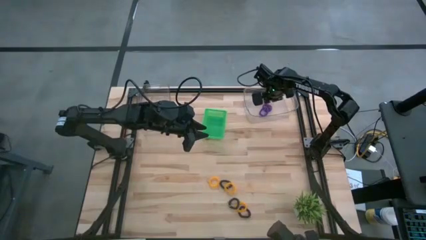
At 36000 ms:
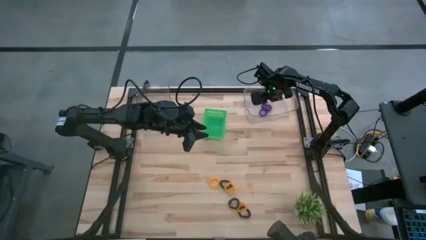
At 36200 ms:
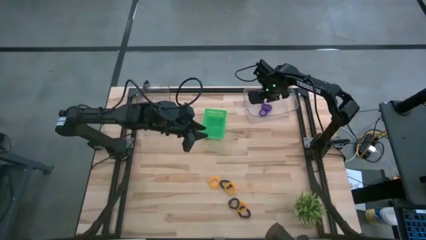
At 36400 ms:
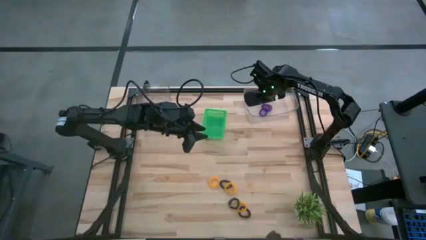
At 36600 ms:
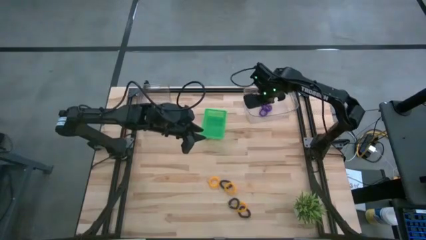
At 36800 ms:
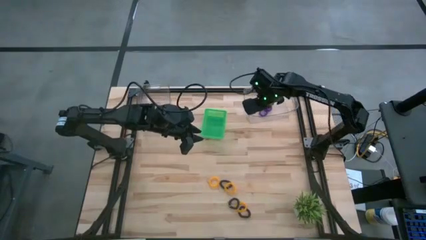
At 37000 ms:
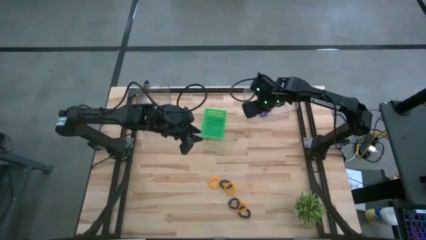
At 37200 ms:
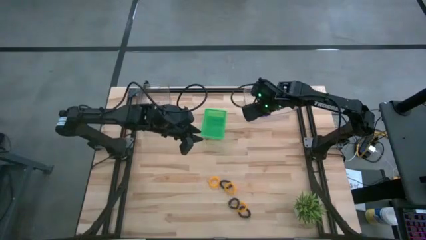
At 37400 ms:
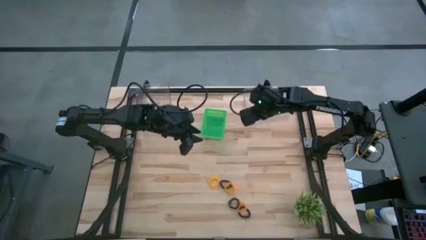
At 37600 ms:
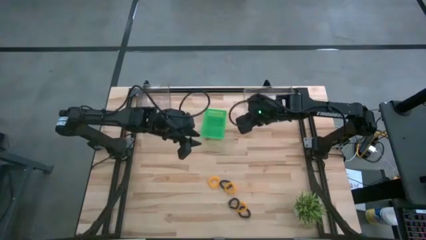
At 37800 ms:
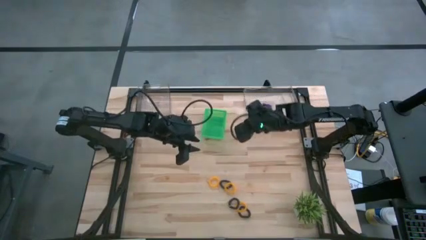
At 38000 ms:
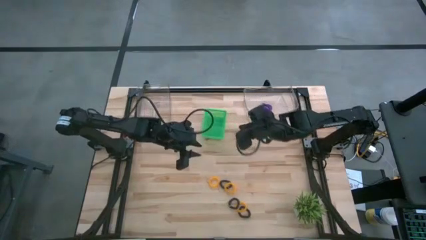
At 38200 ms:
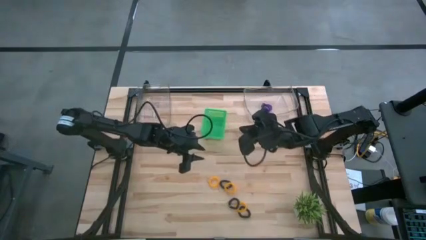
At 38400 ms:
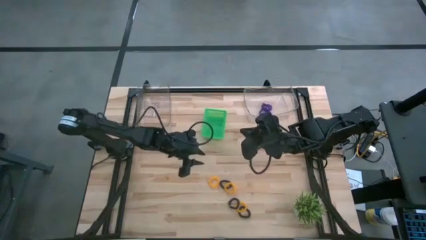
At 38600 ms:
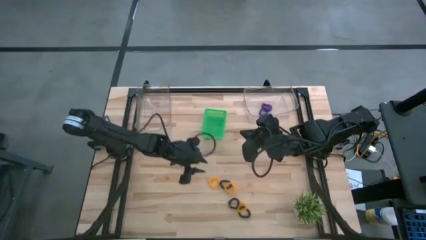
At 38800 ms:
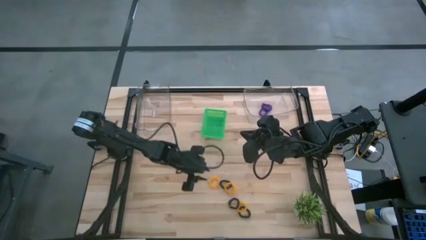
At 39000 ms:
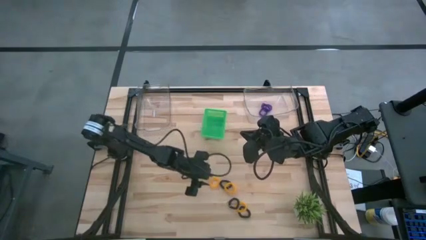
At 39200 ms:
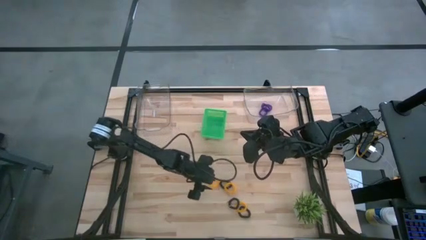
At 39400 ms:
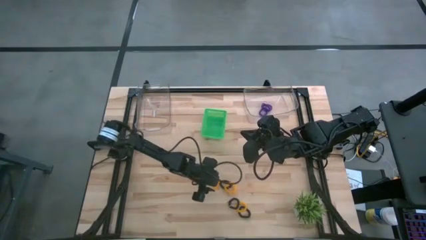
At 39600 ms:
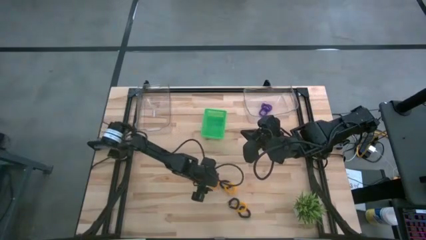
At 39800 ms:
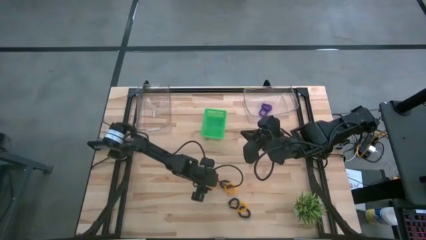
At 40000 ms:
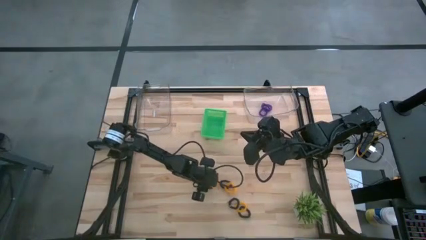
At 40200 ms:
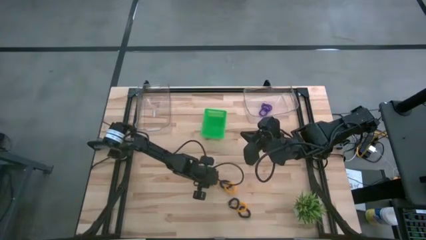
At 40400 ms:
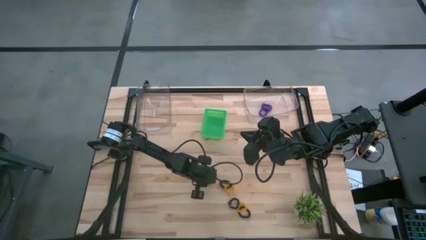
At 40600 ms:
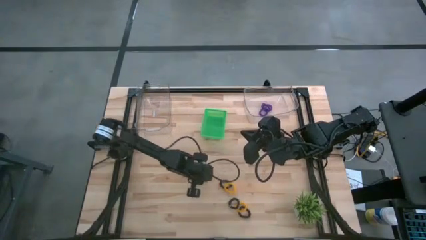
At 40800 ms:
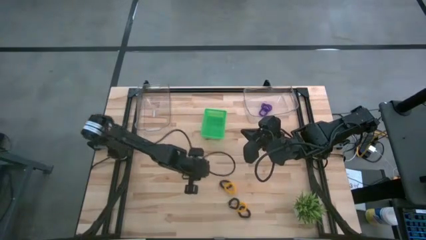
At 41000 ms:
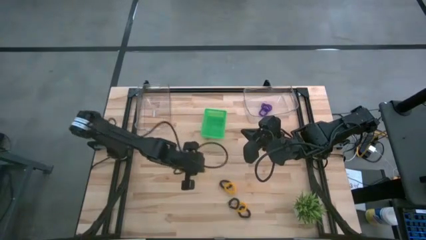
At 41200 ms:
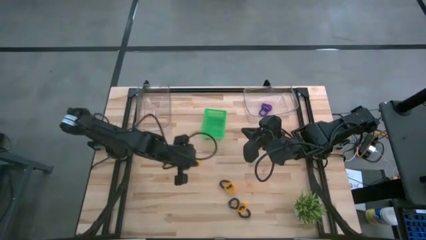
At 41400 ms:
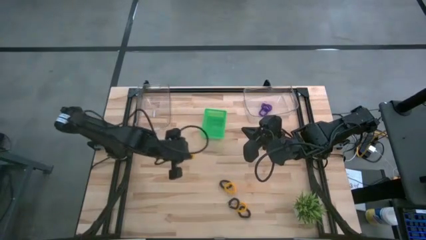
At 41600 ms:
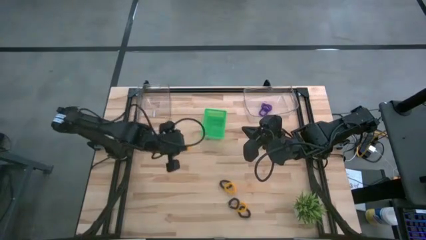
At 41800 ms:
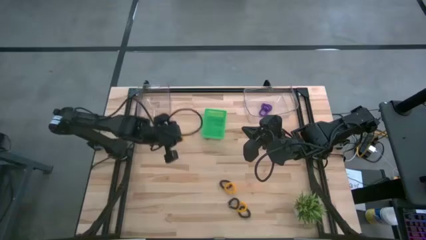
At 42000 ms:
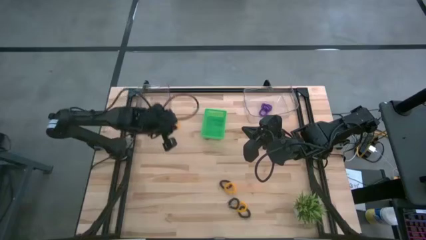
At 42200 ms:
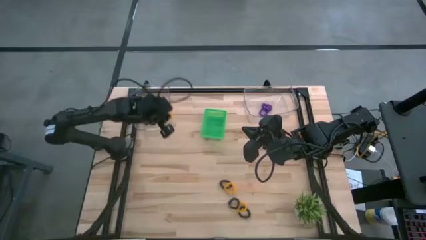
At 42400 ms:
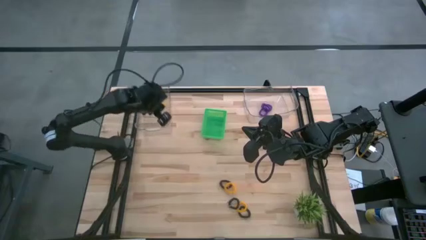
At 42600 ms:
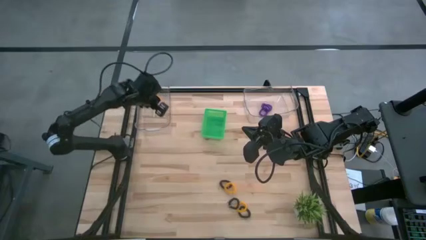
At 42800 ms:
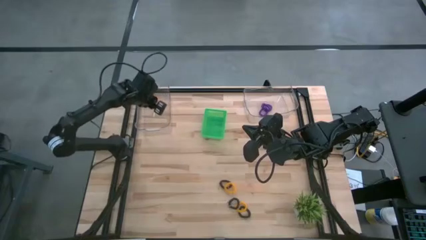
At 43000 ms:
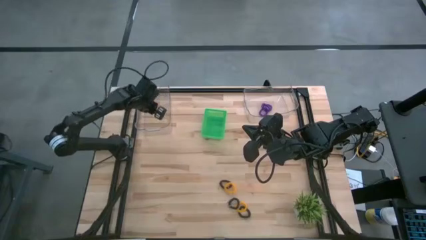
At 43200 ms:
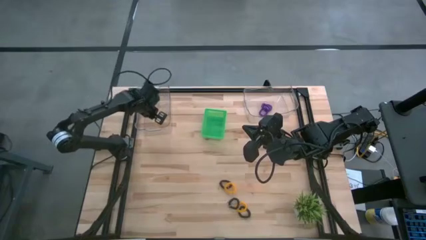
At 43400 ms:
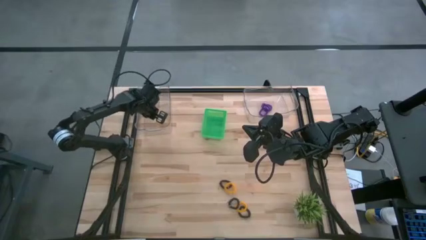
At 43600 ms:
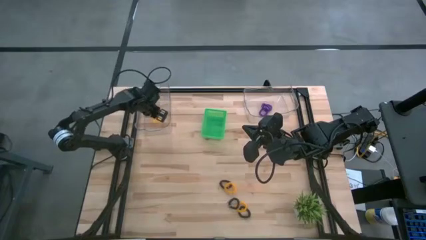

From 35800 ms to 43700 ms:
Task: Sort spring keychains
Put the top yellow spring keychain into the left transparent bin

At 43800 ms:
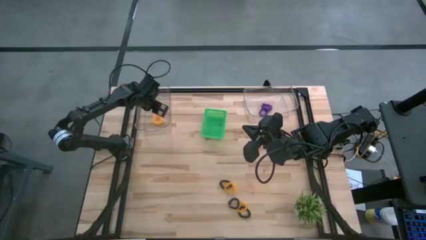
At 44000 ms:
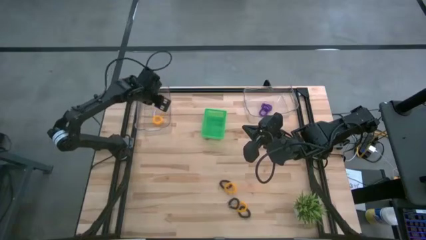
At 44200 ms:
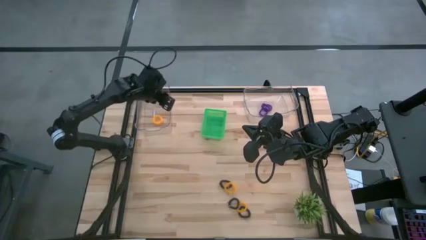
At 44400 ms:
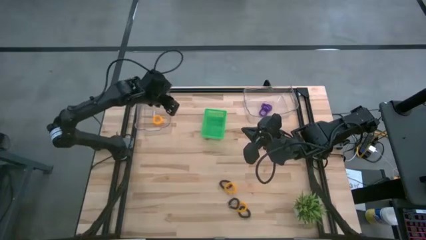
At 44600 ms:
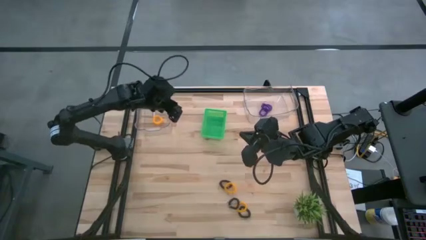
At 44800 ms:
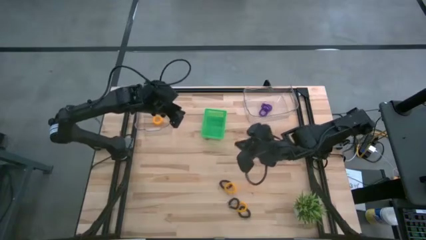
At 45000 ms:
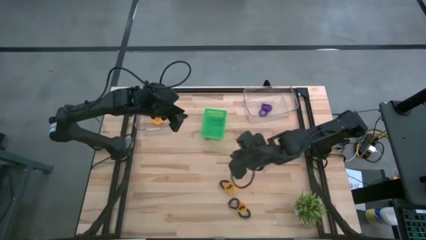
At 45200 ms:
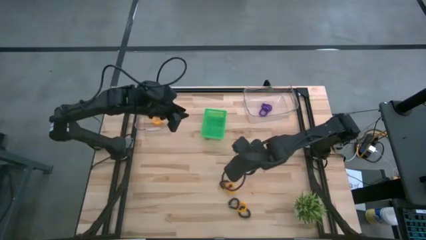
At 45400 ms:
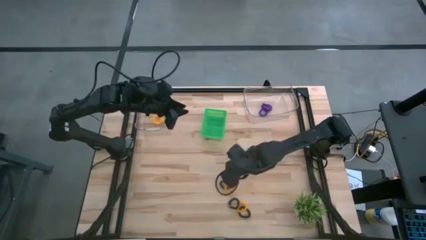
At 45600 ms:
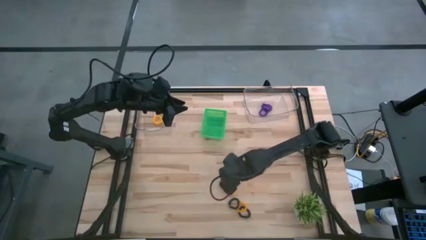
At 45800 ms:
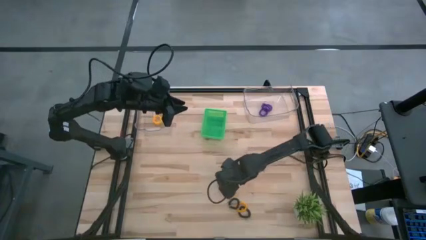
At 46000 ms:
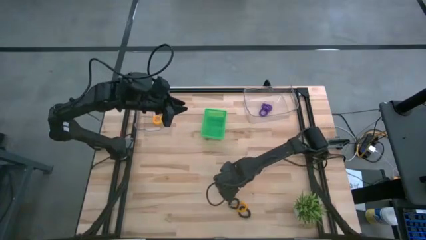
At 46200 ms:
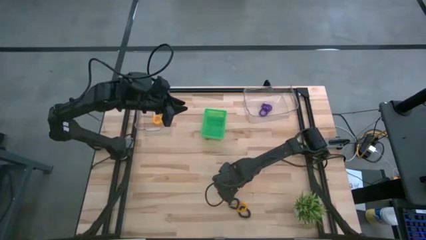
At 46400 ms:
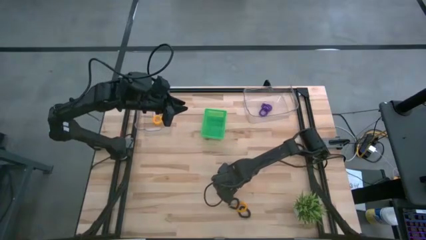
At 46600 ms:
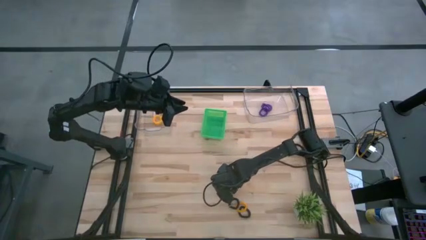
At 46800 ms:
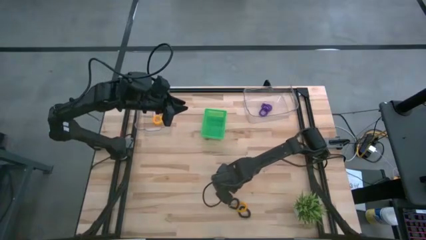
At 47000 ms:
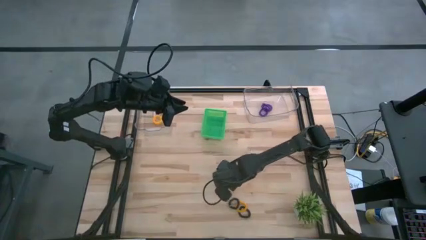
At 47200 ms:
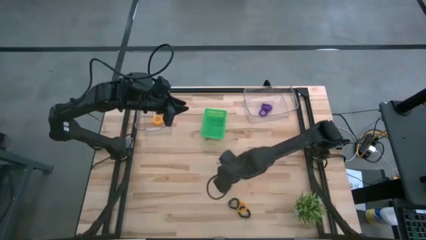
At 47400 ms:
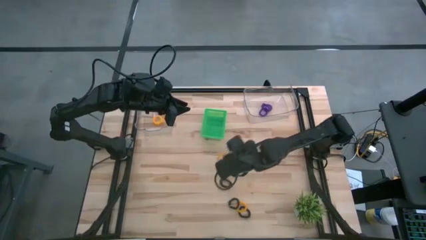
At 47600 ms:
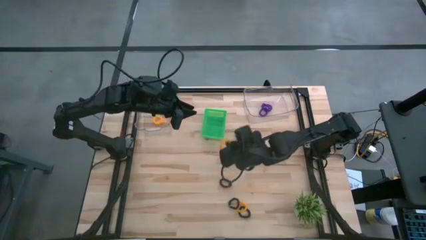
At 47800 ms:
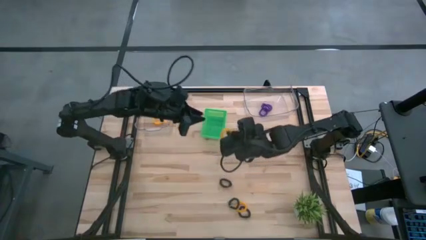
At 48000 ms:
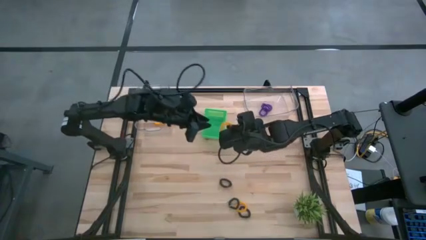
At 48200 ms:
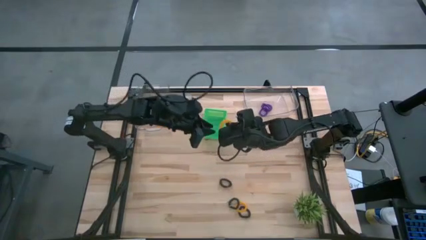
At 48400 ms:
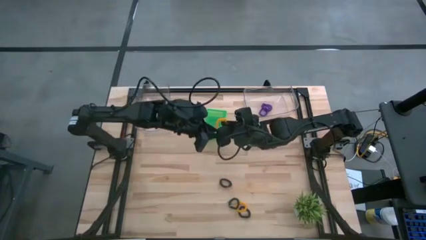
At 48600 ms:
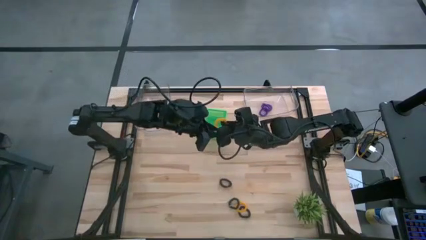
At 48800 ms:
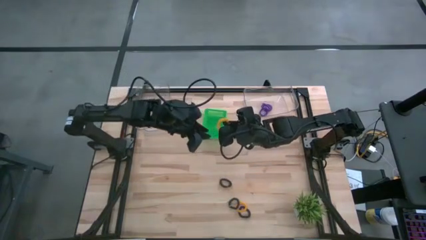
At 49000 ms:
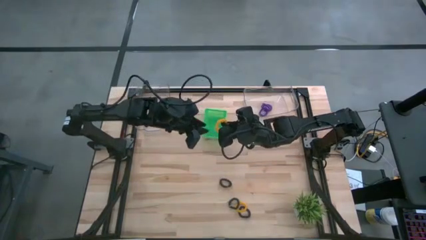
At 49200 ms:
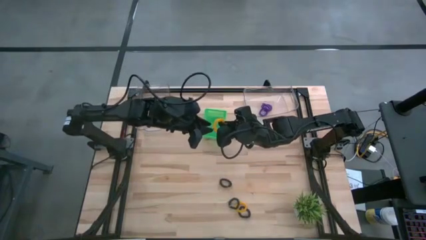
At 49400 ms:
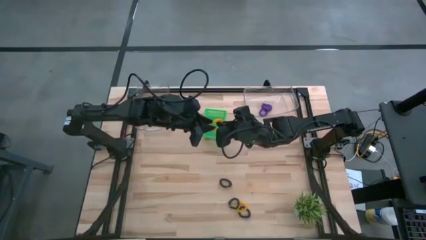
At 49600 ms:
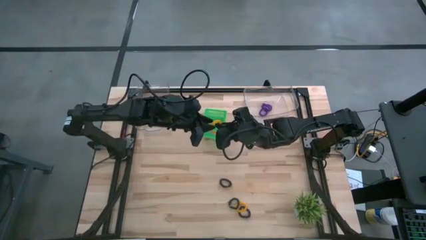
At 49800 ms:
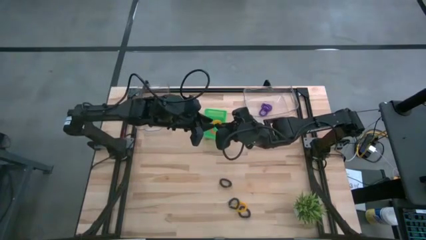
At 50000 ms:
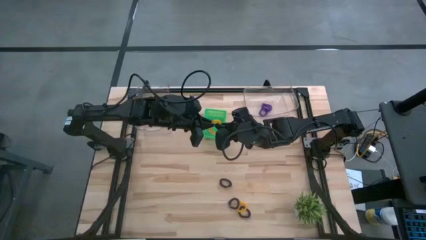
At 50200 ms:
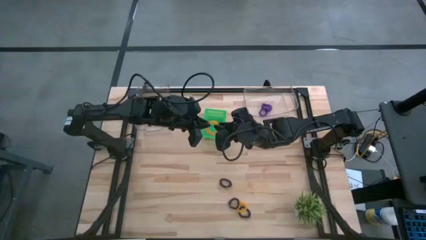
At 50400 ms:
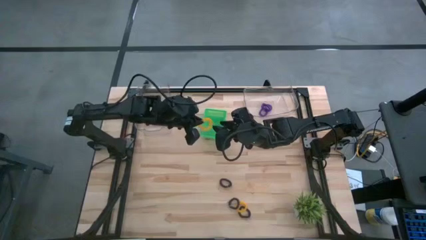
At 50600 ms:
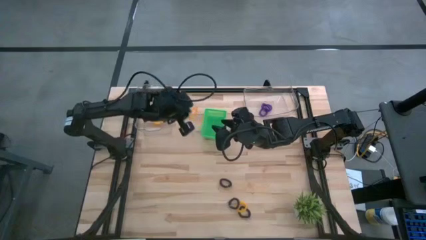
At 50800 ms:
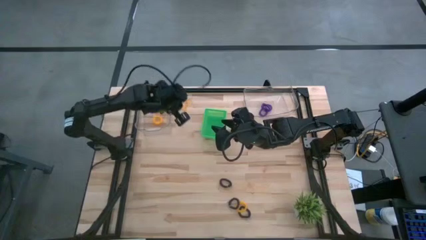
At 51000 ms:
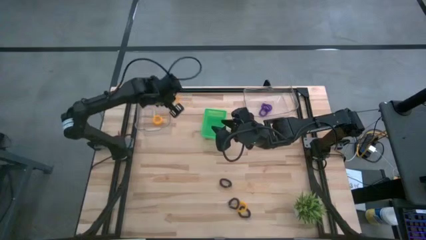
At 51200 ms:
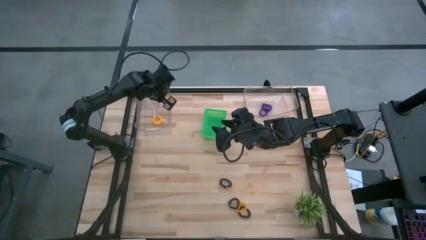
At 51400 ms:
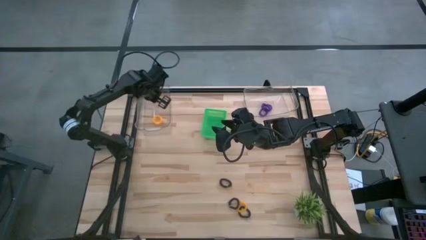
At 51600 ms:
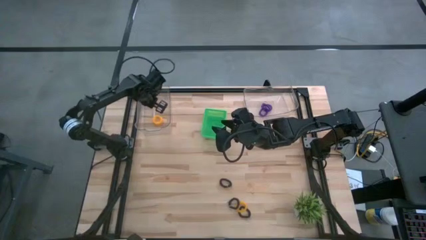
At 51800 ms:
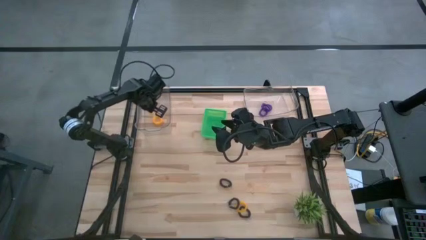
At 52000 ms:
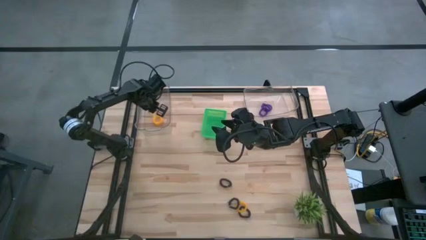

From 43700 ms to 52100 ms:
Put the top yellow spring keychain into the left transparent bin
